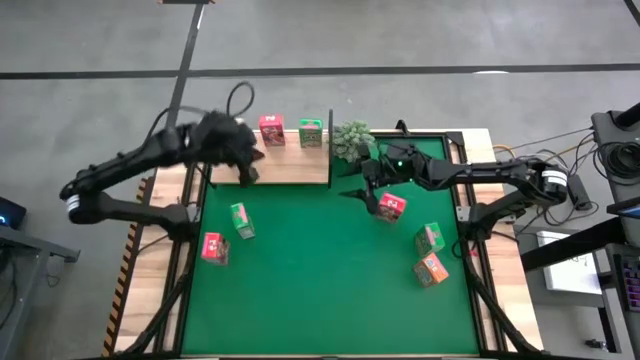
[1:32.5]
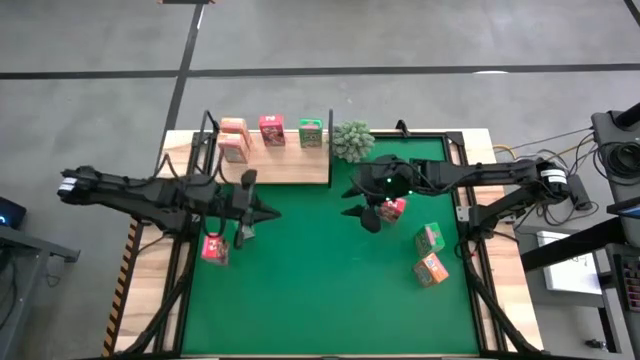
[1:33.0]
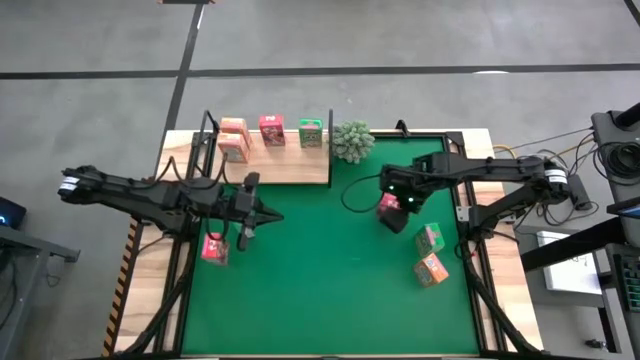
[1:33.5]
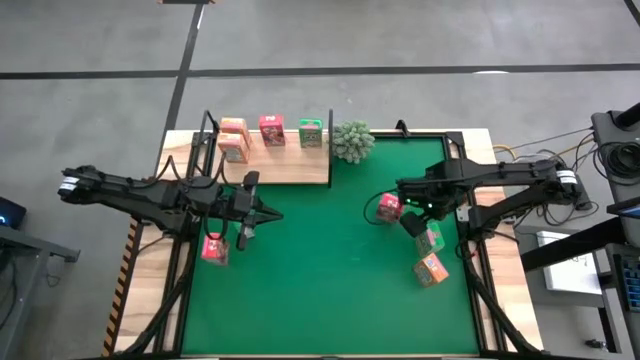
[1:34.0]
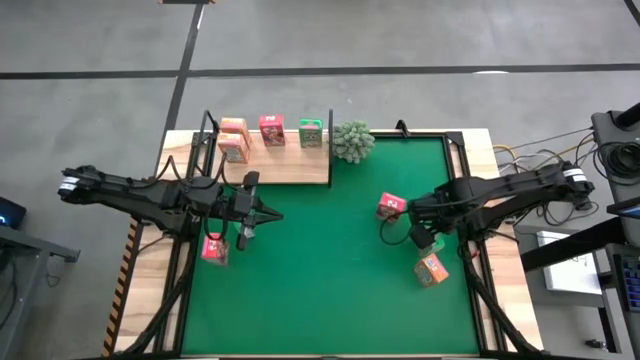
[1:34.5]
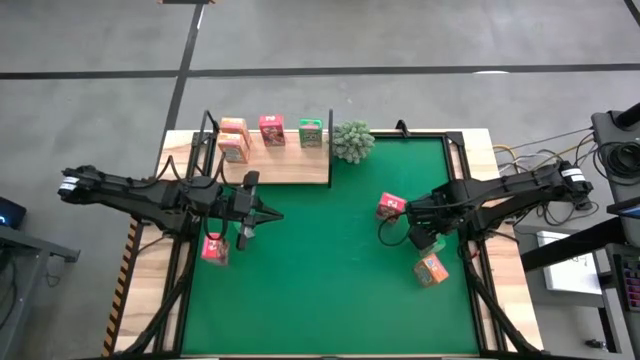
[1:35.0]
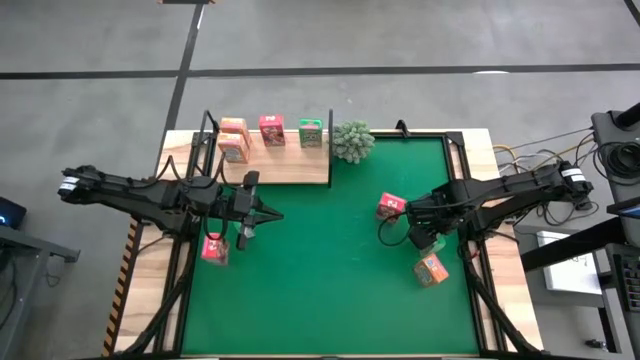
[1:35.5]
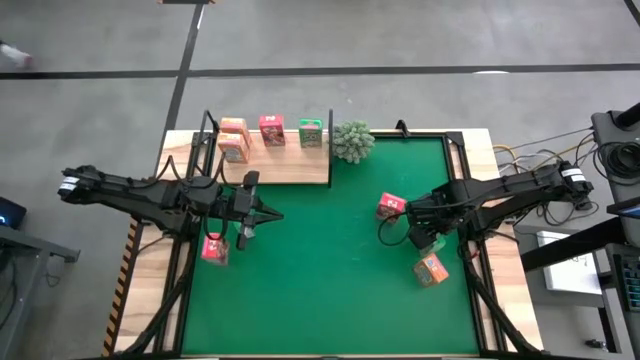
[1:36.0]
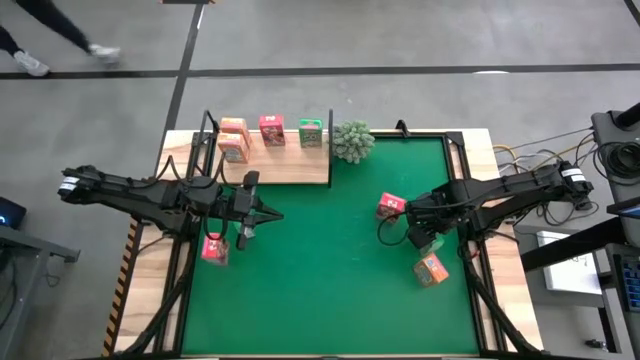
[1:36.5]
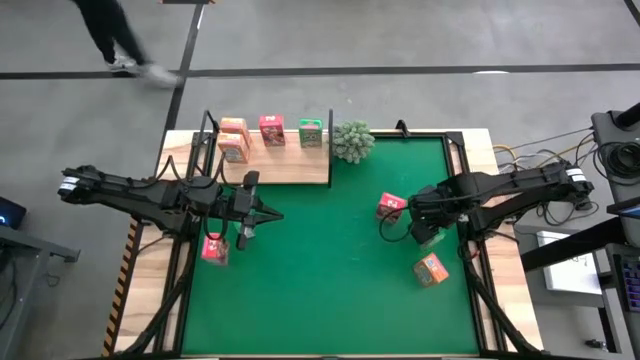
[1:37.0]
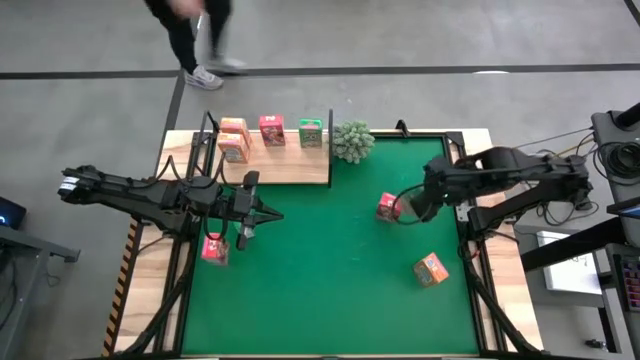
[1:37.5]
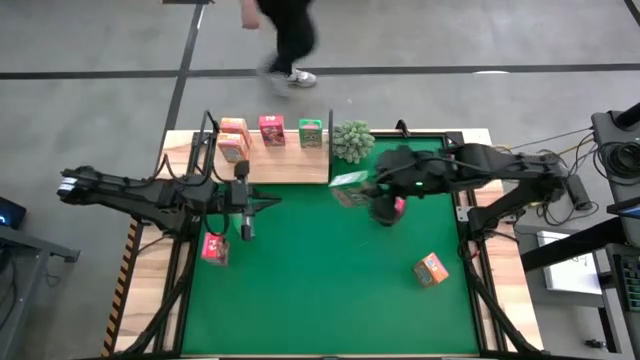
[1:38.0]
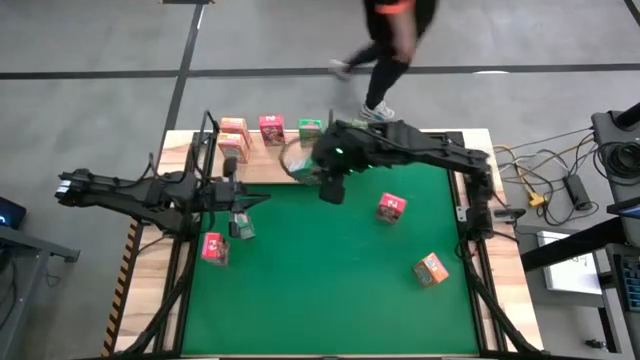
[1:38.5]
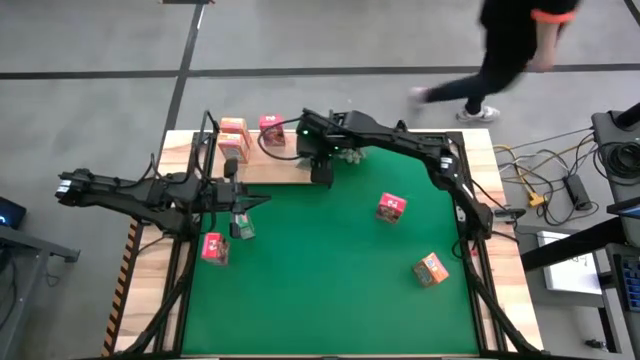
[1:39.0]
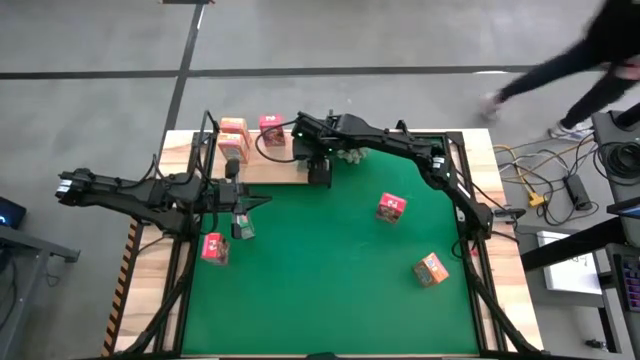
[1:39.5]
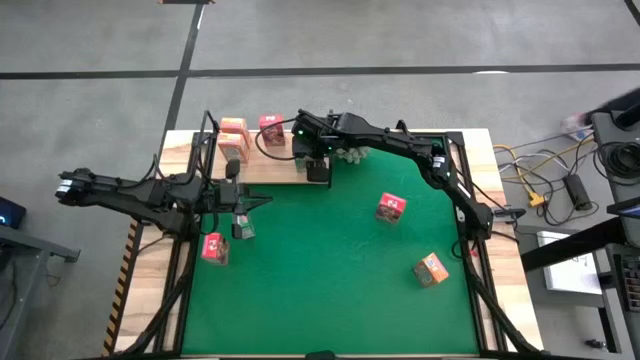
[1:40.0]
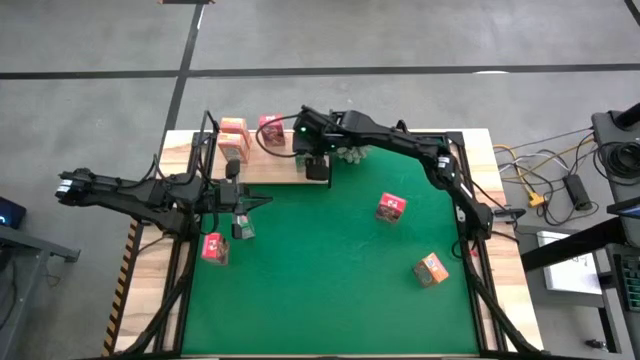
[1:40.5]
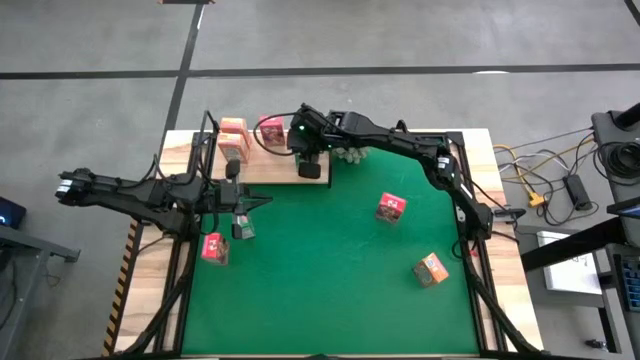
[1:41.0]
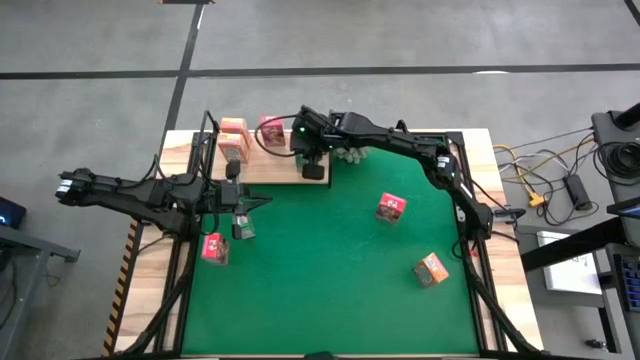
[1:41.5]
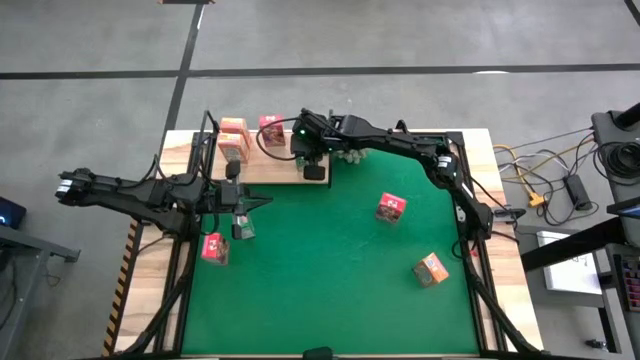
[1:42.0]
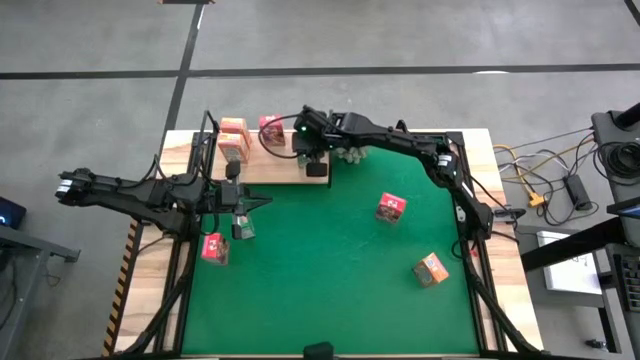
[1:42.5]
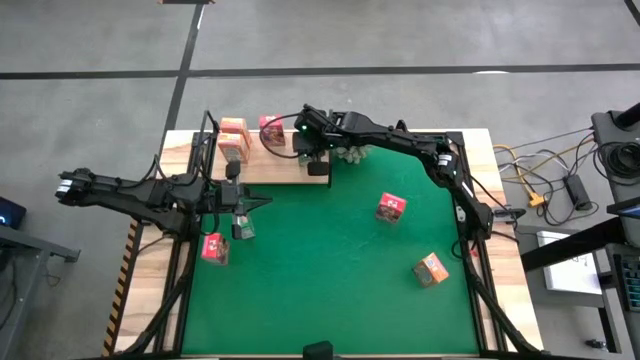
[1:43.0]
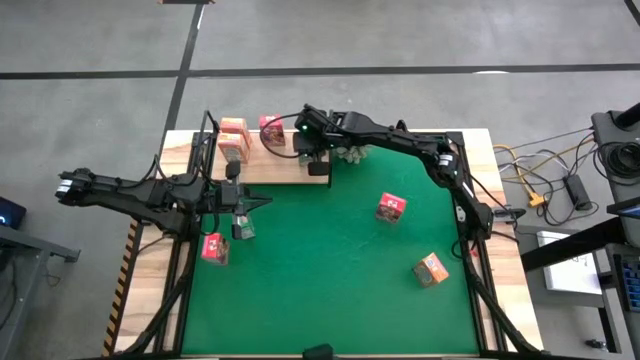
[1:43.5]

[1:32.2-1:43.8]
Task: Stack cereal on shelf
Put the right green cereal box on the shelf aligned with the other green cereal box
